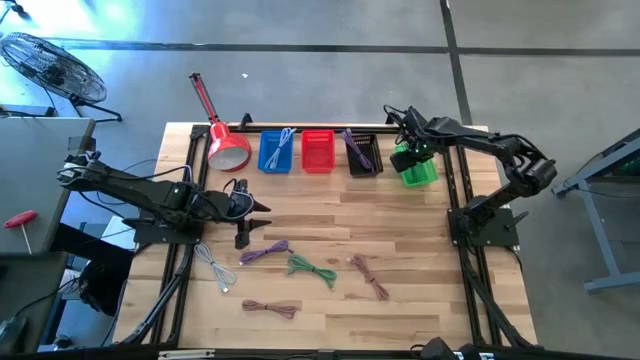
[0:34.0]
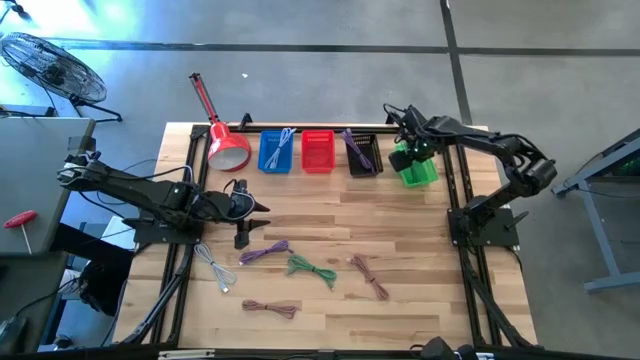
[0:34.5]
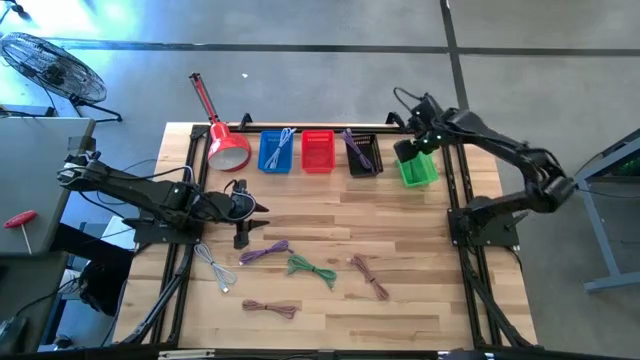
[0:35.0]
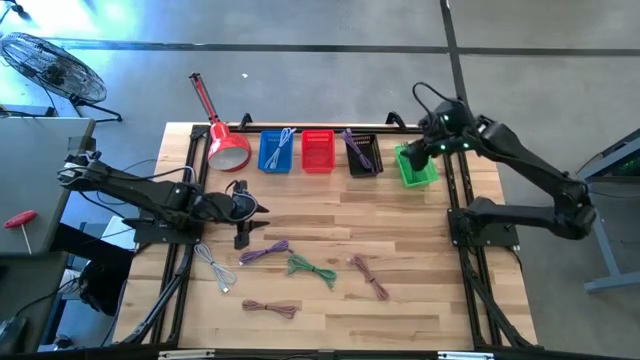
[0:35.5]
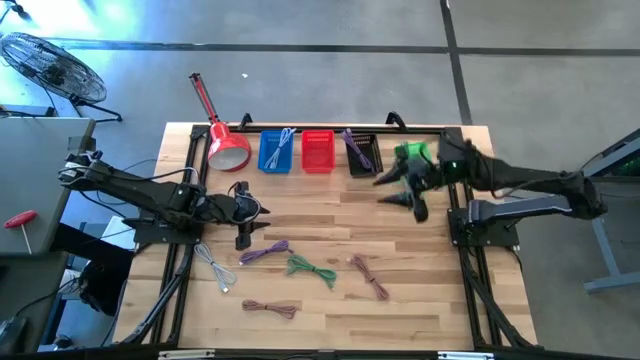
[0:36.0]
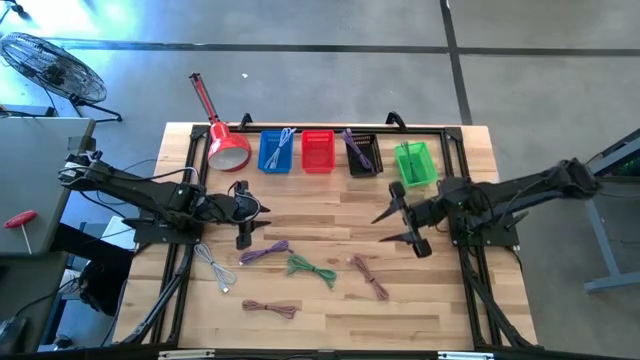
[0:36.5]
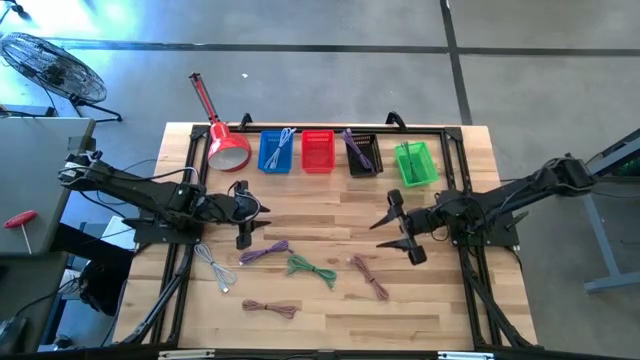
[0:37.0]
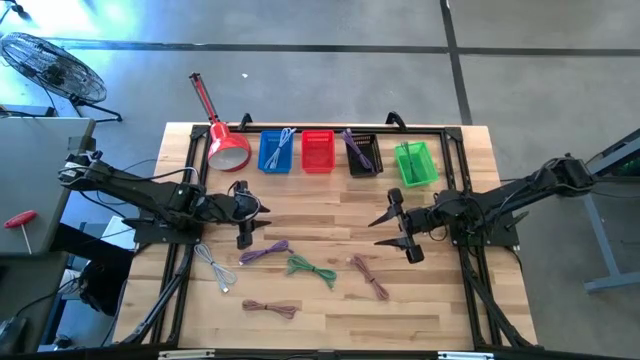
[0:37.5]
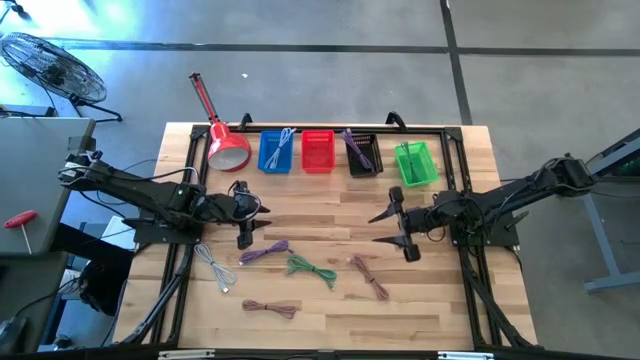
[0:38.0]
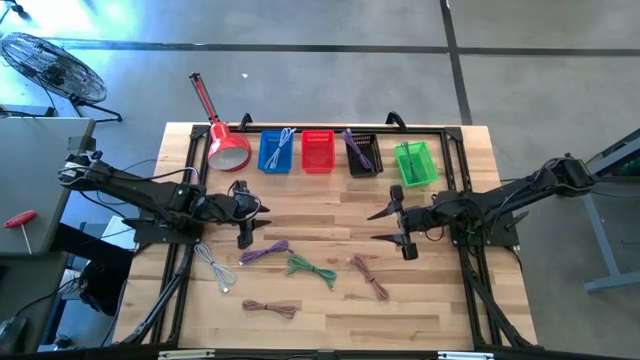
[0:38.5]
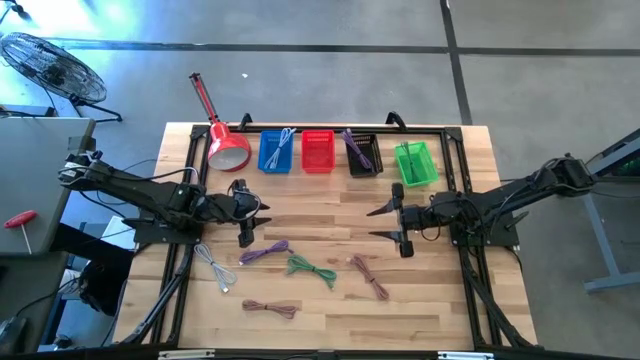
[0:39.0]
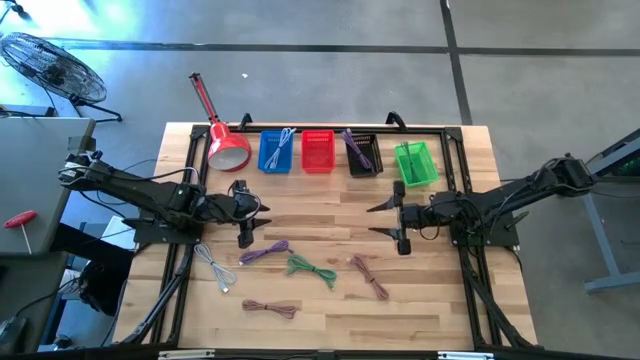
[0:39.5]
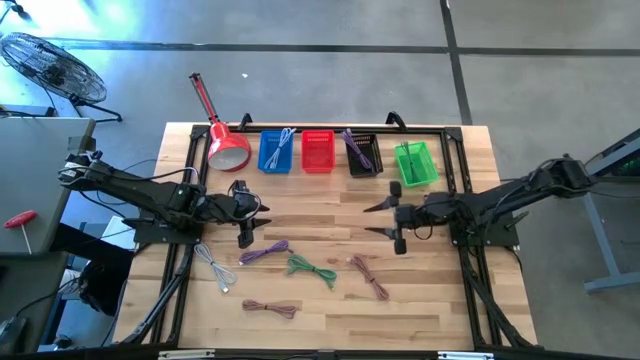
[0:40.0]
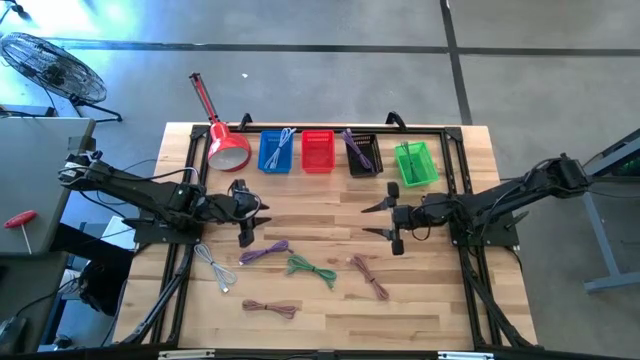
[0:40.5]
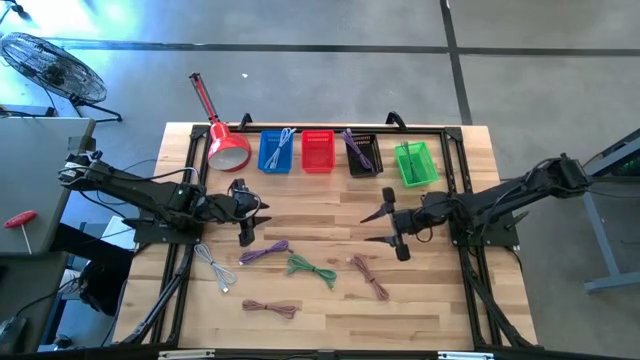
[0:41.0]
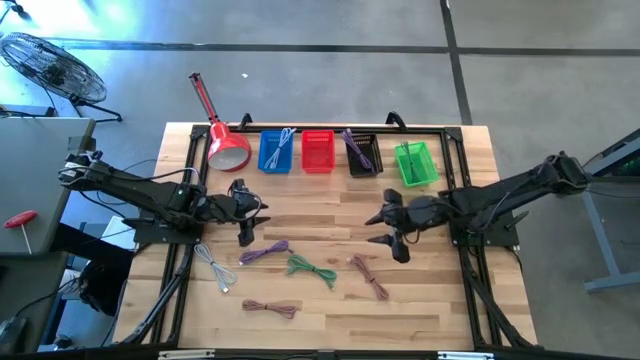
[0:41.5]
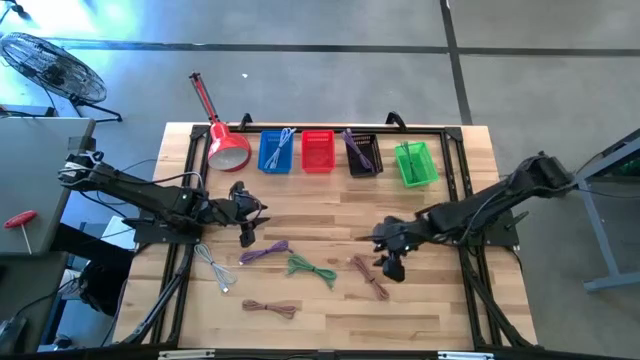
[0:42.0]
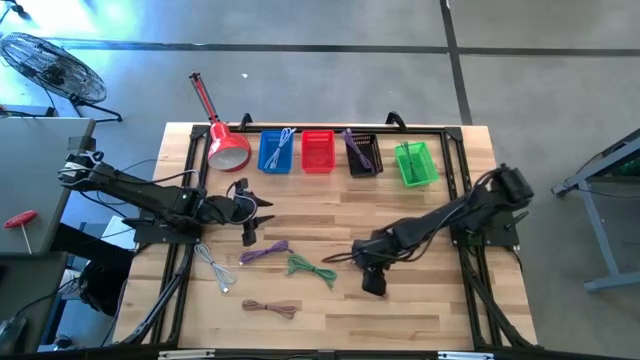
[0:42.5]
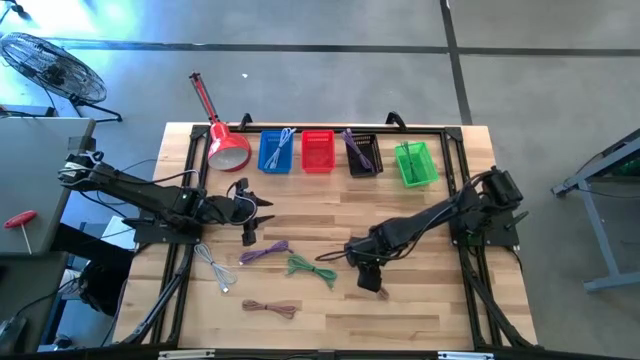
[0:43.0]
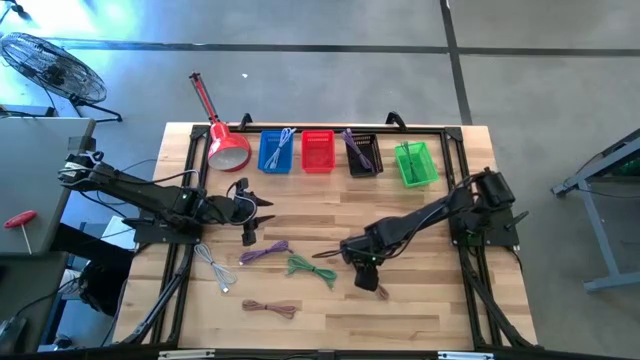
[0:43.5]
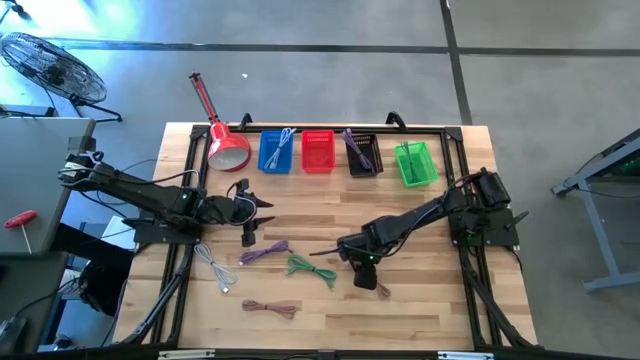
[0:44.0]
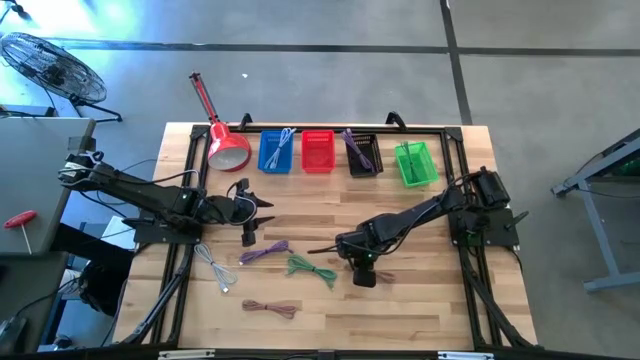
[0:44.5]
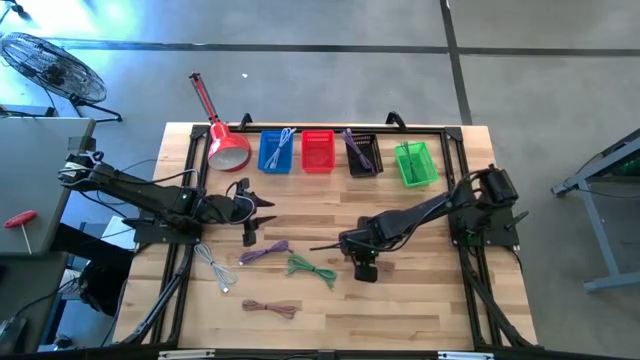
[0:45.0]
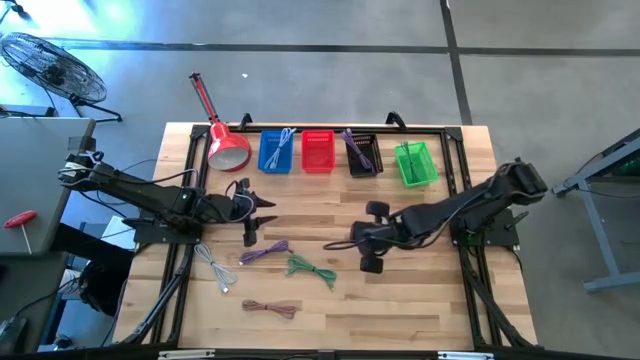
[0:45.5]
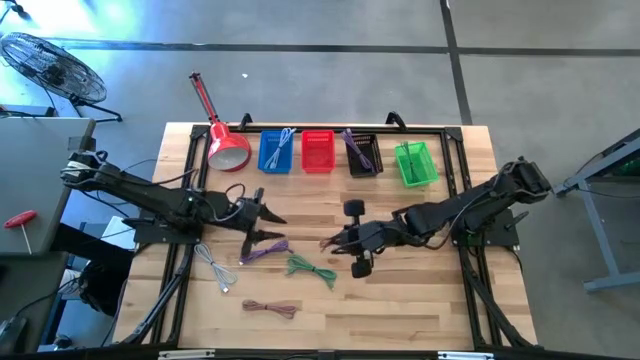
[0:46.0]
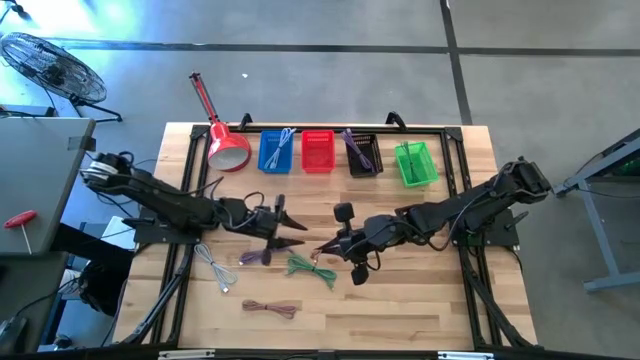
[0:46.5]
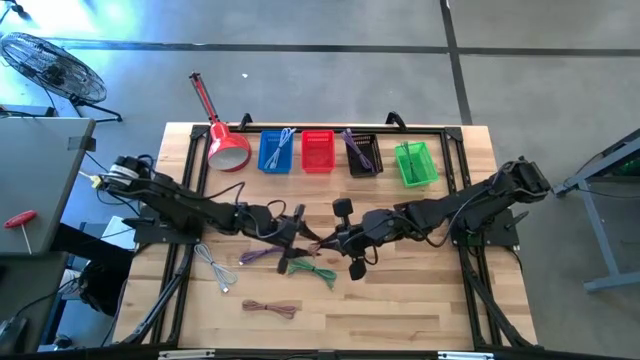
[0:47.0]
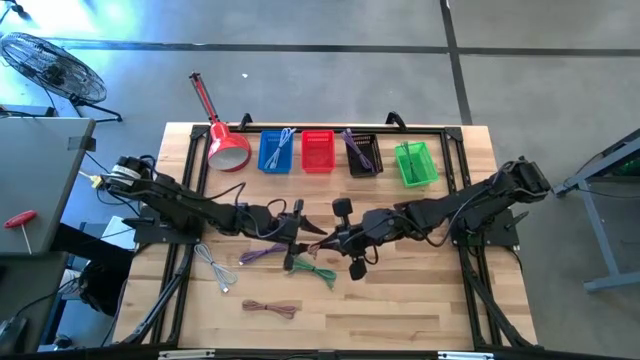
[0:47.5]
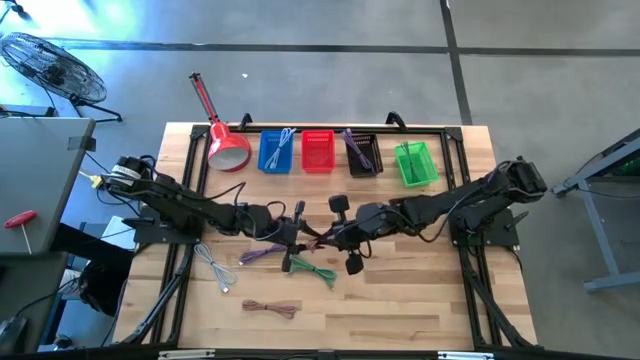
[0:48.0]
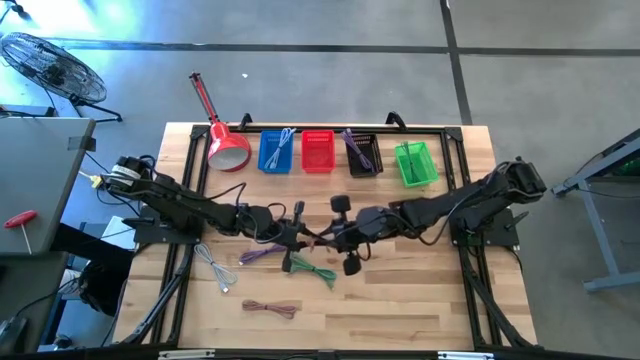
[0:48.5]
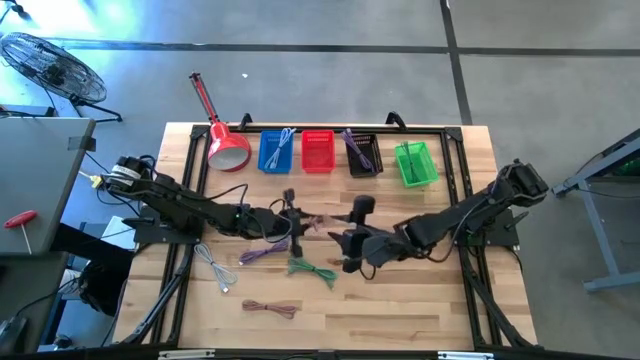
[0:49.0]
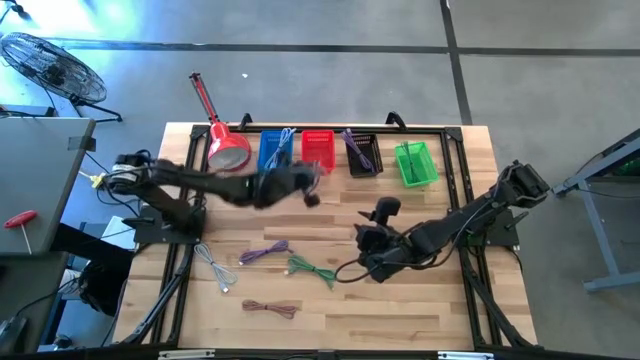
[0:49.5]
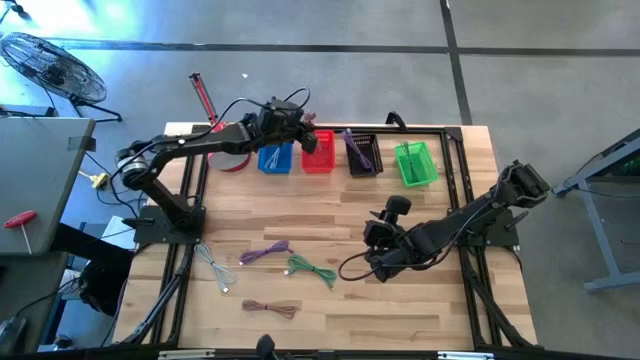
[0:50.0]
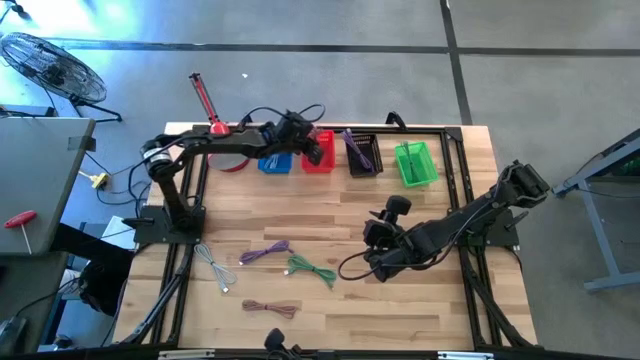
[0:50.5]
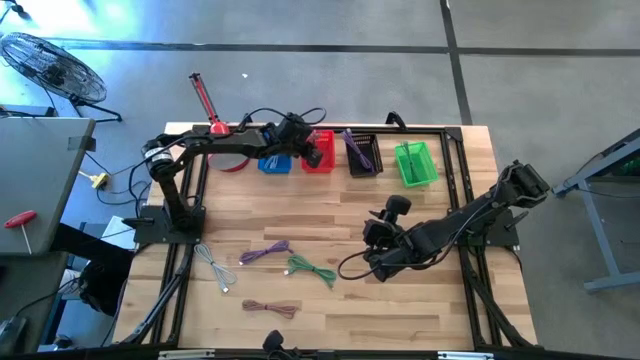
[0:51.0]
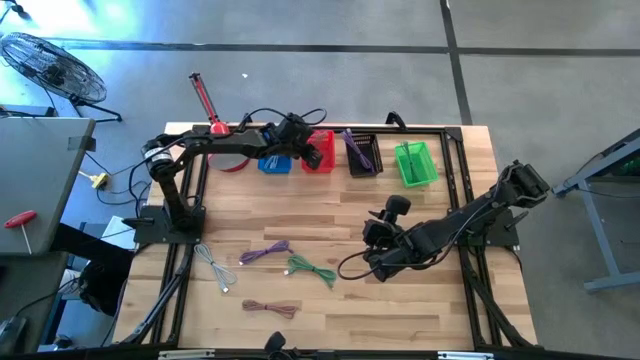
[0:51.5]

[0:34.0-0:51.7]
Task: Pick & Place USB Port
Put the right pink charger cable into the red bin
